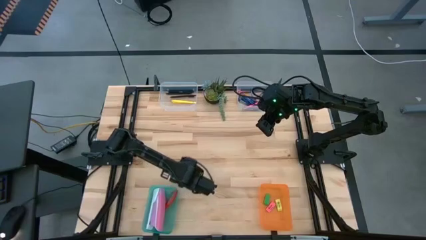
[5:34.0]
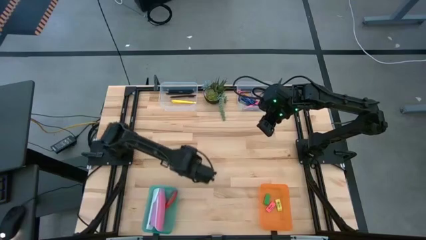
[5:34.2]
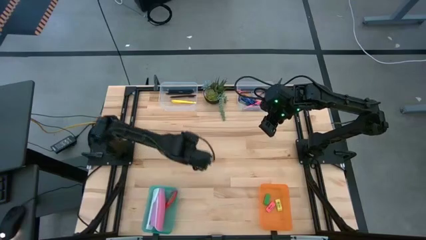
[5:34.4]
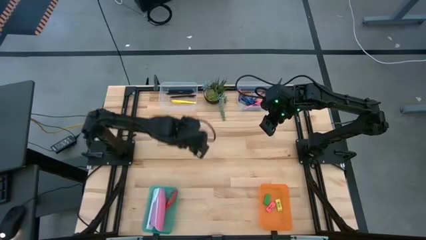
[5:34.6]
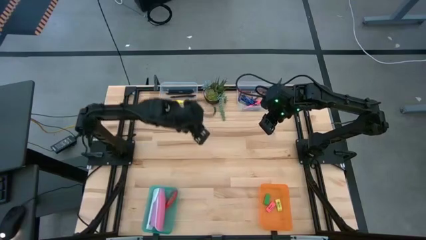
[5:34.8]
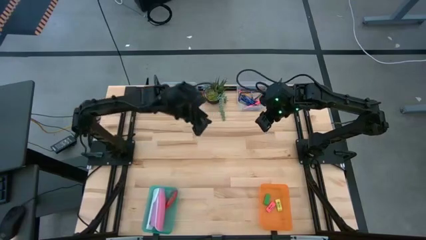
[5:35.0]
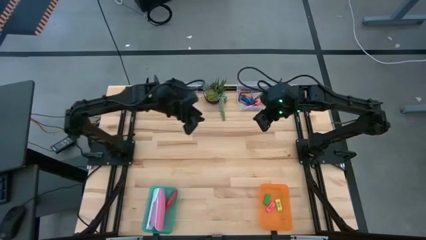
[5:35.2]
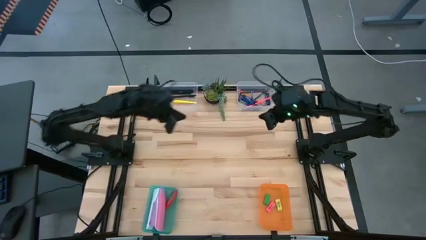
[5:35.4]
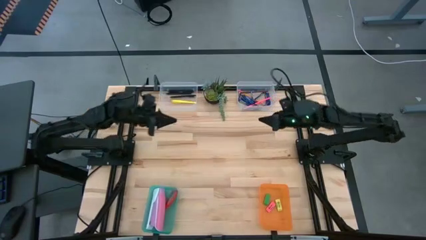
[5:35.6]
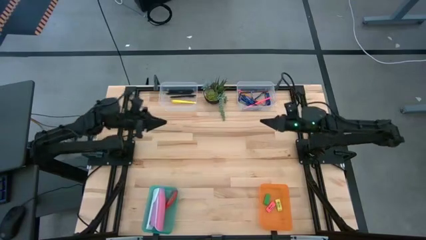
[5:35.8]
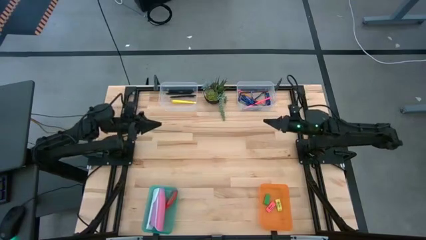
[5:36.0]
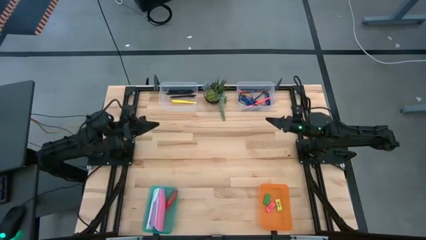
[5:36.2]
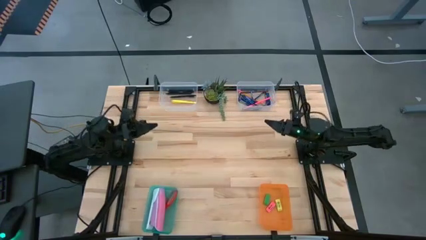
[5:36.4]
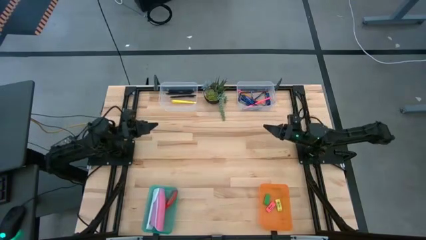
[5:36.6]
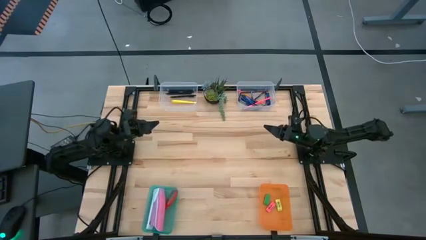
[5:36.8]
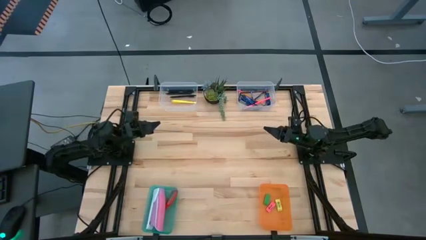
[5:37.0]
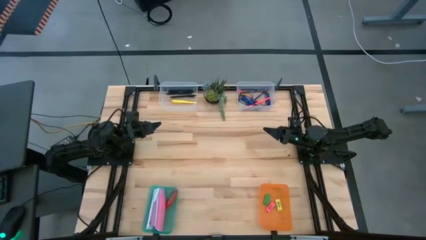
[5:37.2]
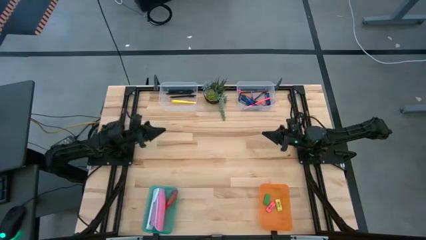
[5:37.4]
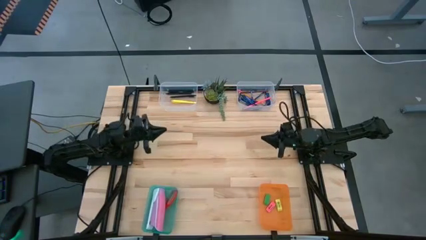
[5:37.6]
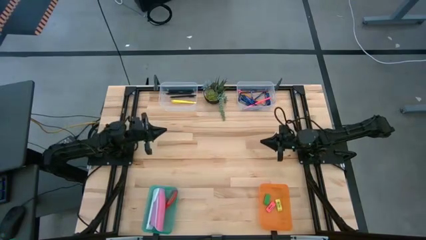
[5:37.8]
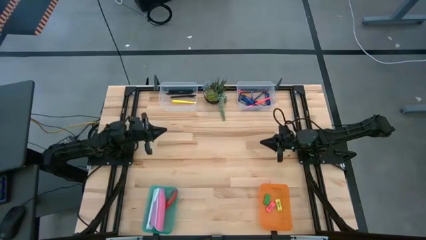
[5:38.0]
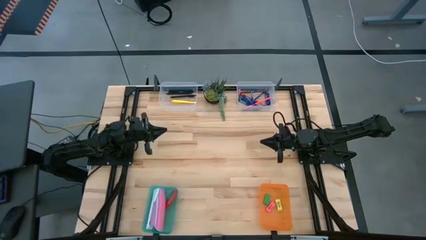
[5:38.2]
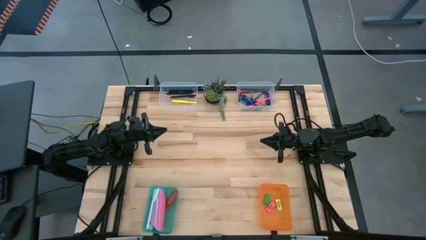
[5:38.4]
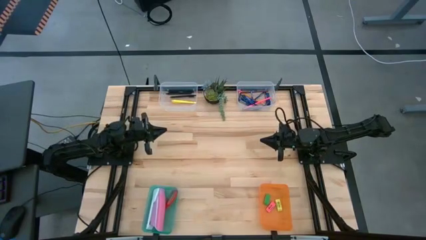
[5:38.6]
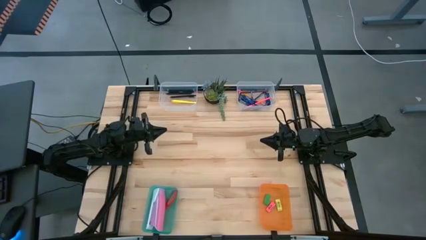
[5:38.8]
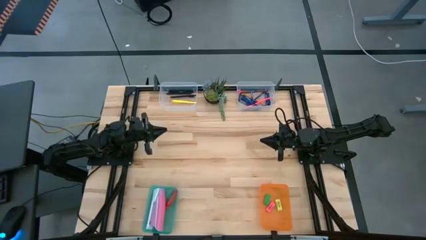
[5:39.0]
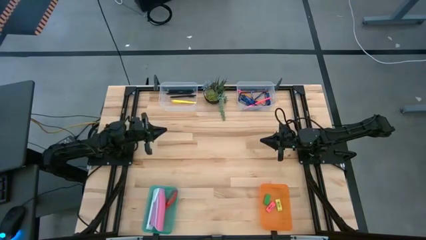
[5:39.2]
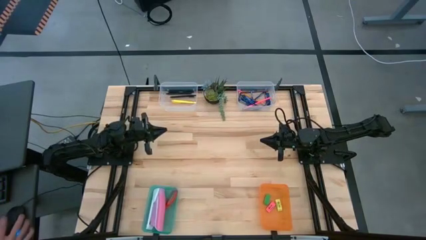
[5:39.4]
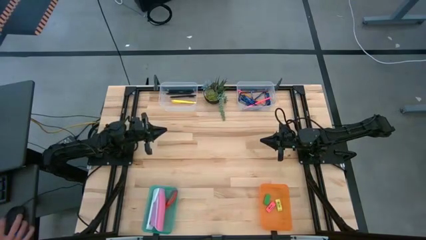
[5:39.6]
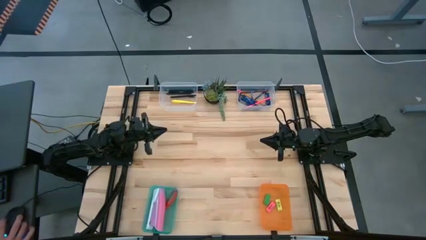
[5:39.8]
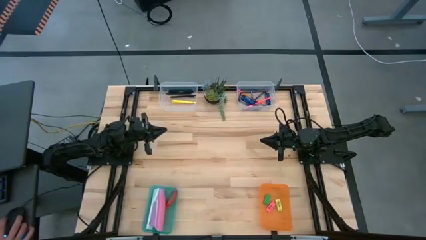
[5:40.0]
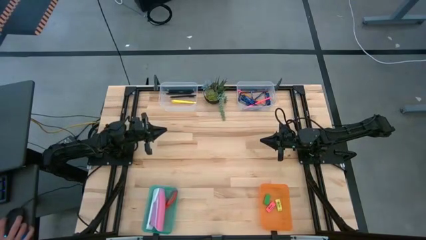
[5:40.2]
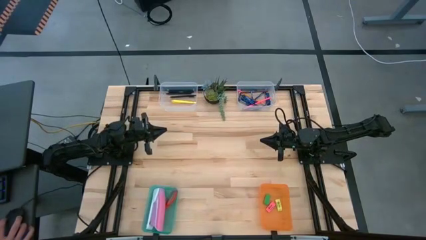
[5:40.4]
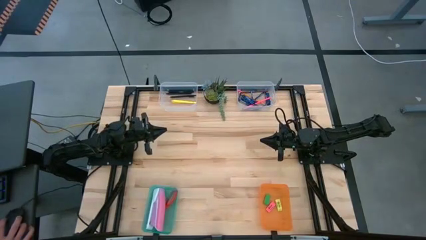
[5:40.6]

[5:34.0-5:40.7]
Task: Sort crayons/erasers/pens/pencils in bins
Return to Home Position

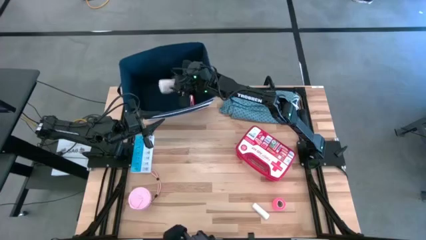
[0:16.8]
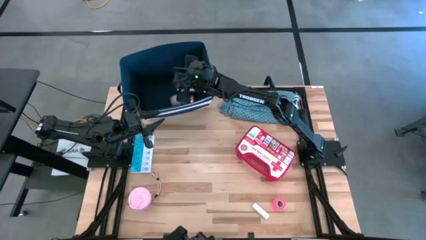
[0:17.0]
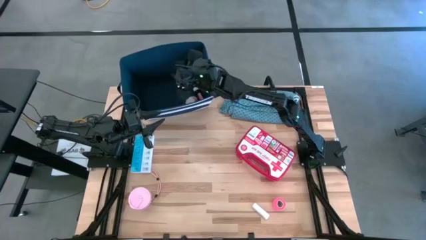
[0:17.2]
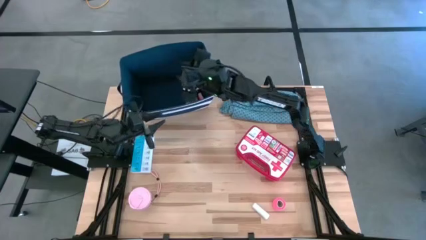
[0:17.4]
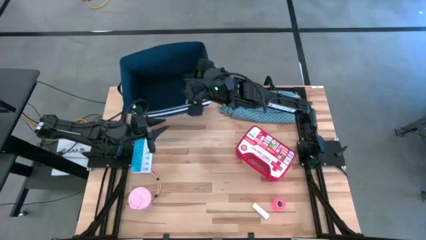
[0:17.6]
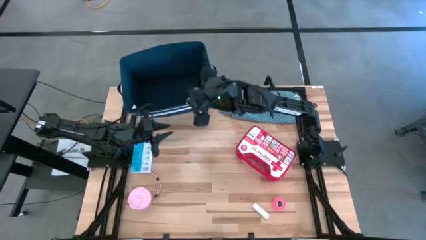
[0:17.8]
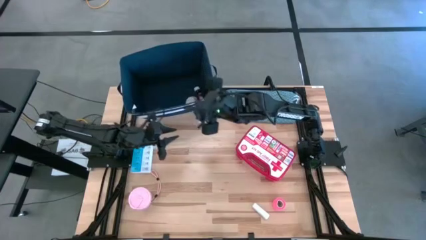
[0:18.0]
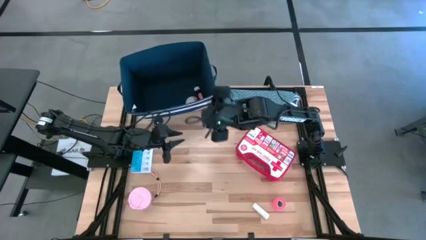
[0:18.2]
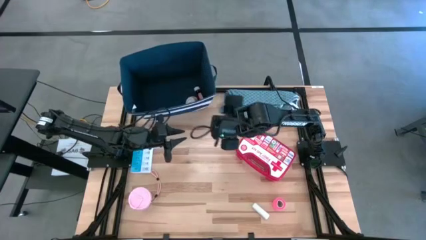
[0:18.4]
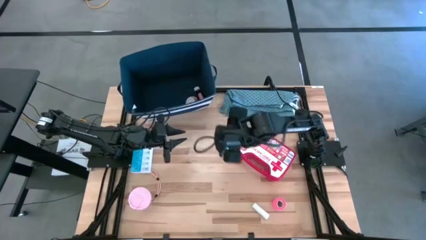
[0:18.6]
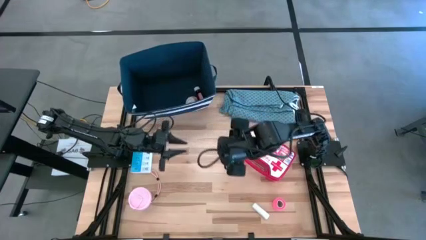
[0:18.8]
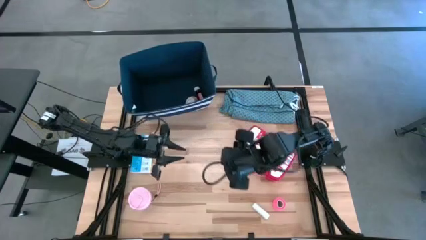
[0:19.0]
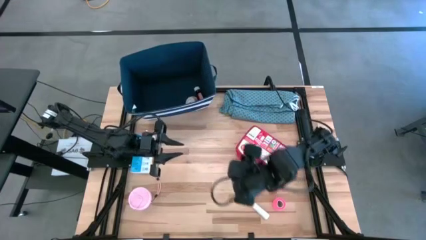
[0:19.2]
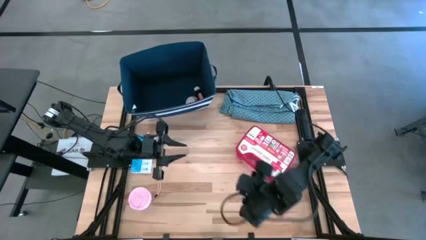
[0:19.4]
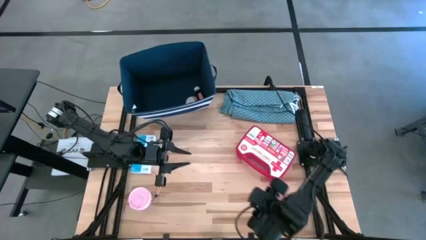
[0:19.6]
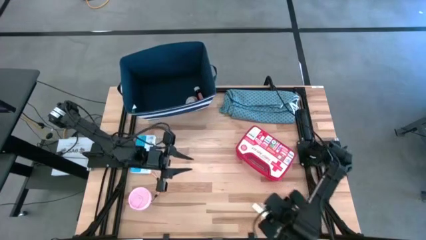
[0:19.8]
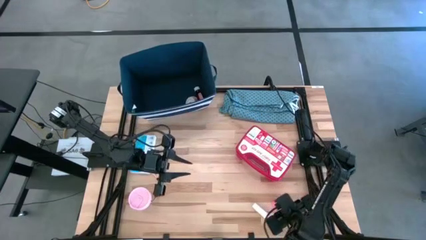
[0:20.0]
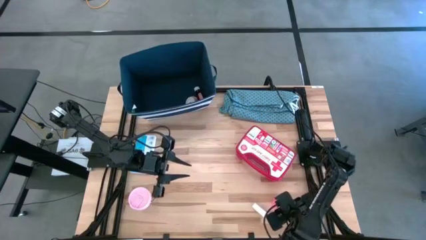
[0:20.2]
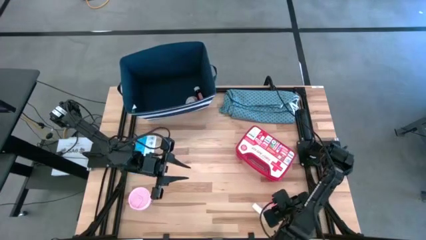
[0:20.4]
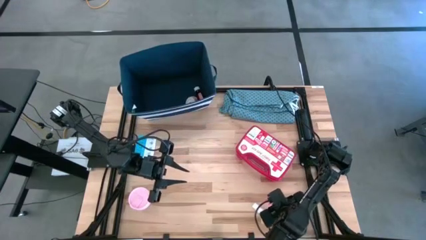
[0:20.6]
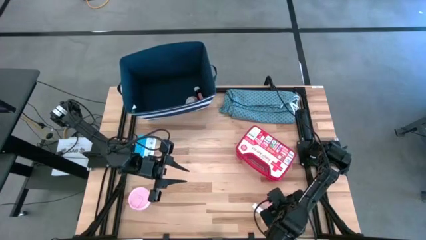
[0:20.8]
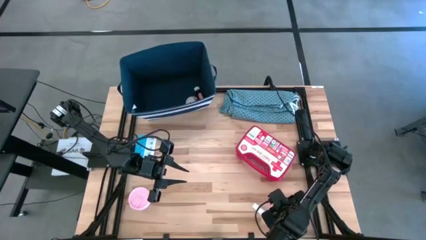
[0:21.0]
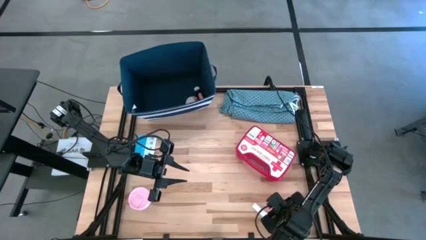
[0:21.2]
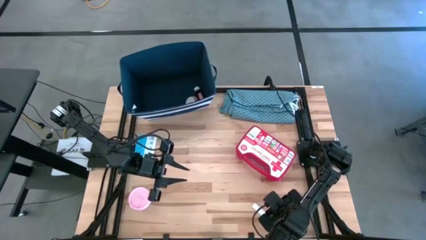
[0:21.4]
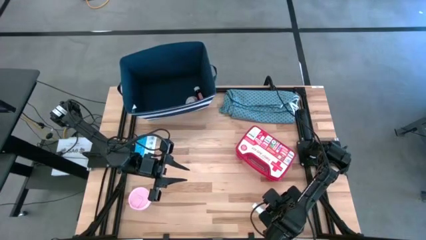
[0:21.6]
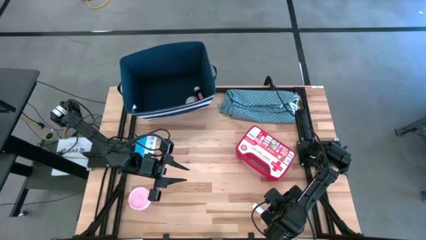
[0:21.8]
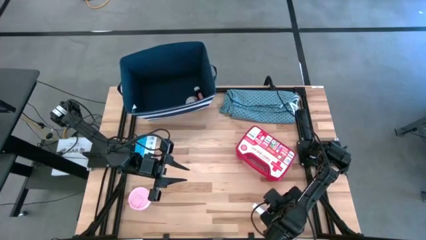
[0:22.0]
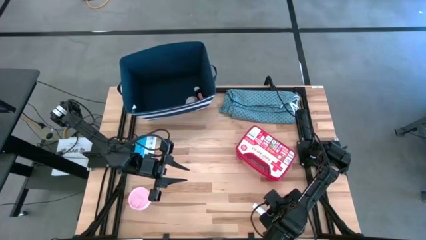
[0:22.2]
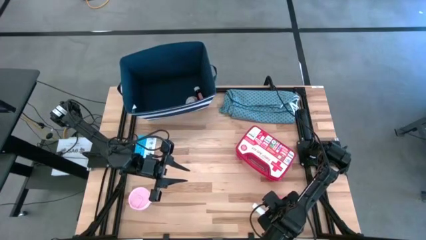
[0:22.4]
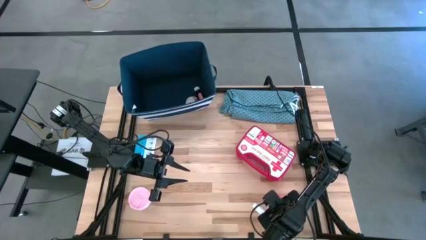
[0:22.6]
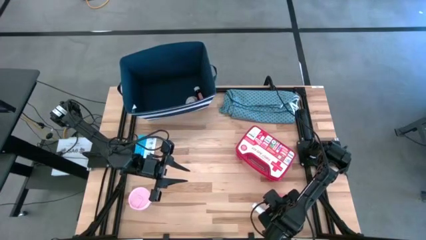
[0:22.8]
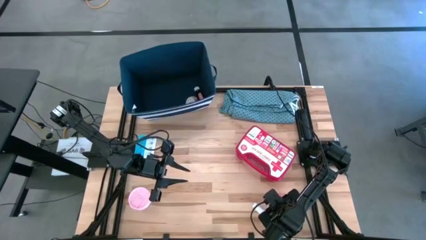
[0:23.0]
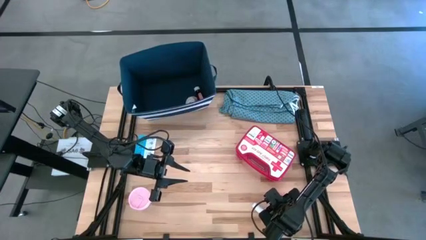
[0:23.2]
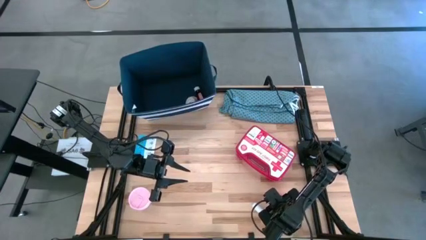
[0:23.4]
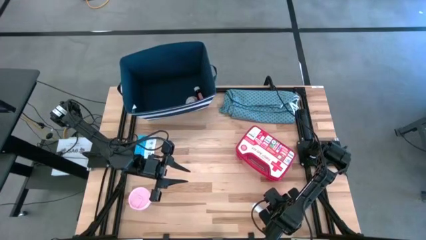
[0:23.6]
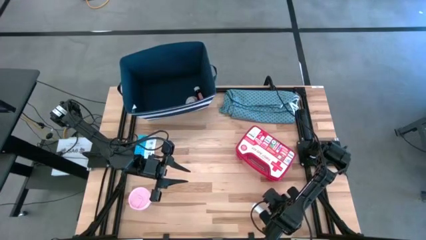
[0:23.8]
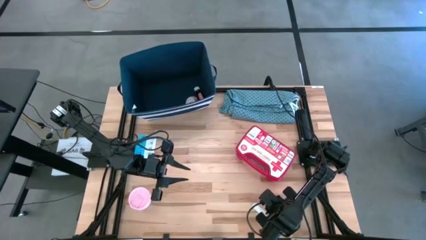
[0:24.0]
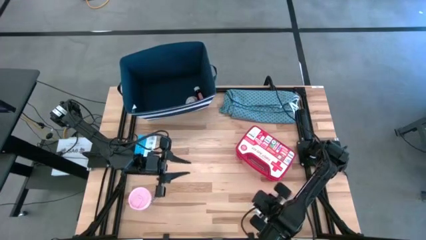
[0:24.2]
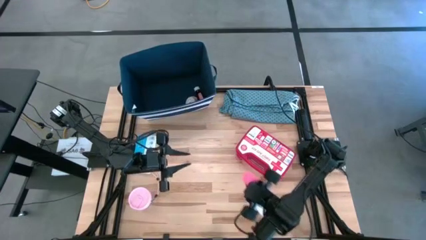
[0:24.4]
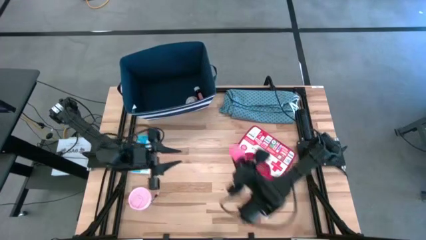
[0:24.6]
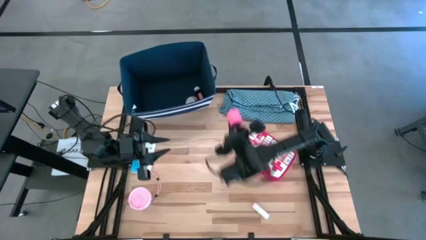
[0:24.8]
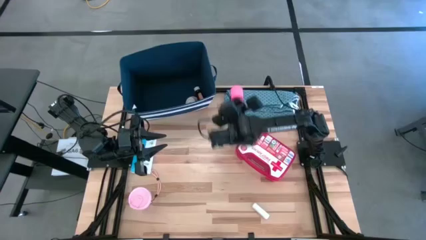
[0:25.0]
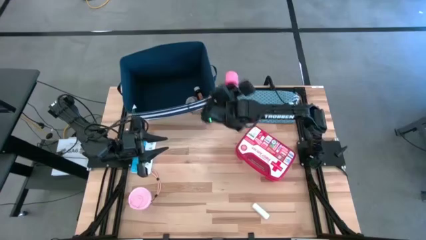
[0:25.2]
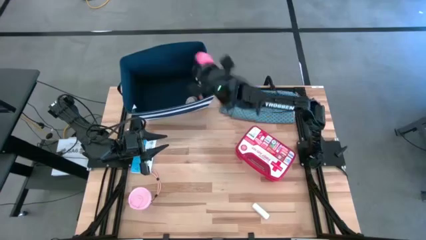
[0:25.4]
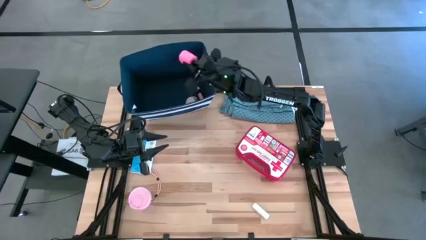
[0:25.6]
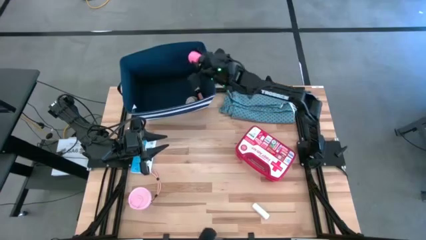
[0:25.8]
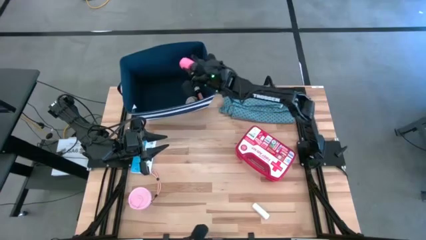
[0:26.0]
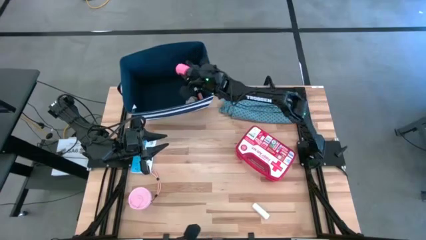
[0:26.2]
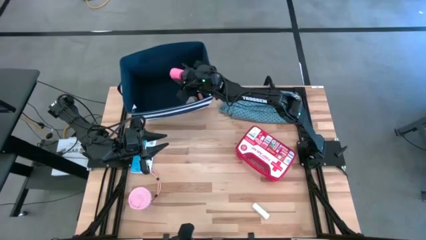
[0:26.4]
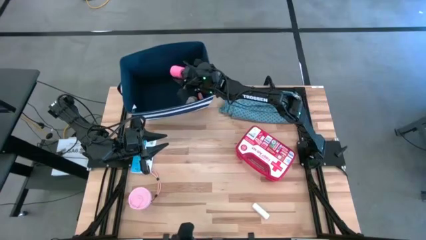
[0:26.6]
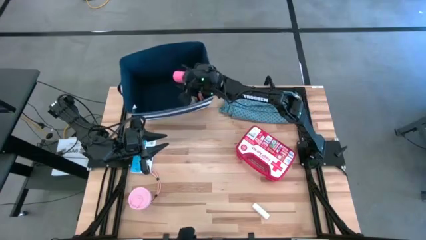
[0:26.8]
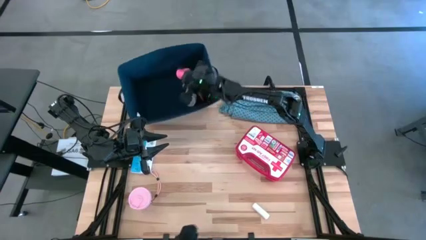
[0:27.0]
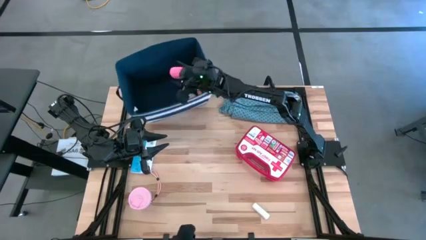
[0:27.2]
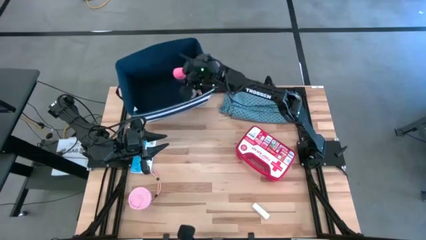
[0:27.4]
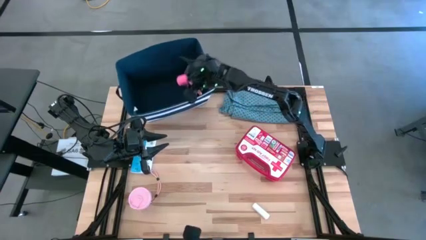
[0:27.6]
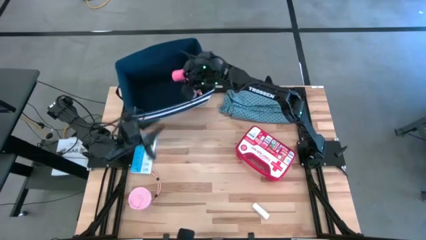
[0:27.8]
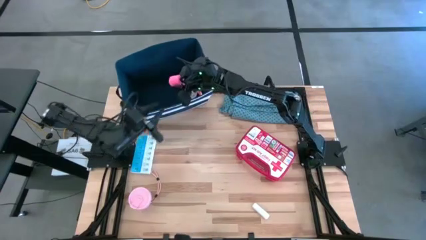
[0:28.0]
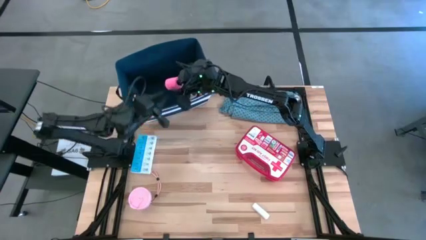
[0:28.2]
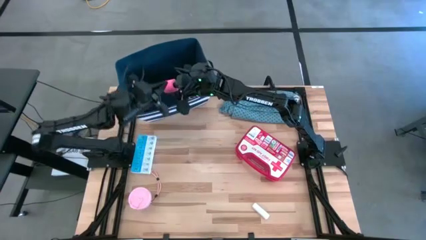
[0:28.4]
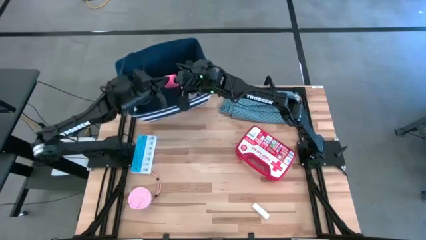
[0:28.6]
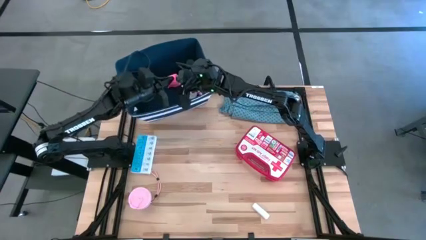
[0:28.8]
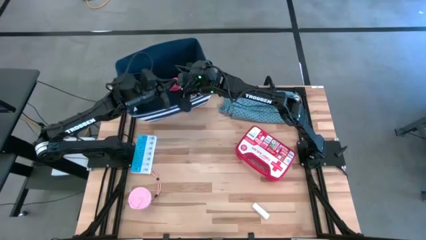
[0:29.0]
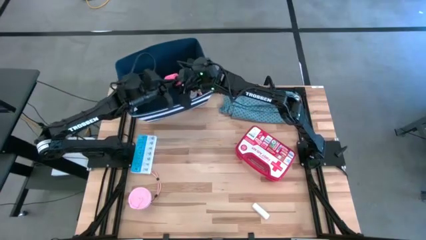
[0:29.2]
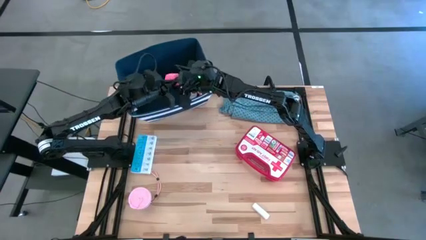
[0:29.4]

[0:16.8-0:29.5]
Task: Pick & place medical supplies in basket/bin
Put the pink bandage into the blue bin
